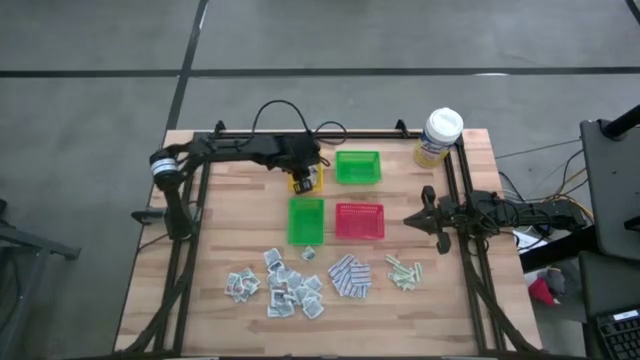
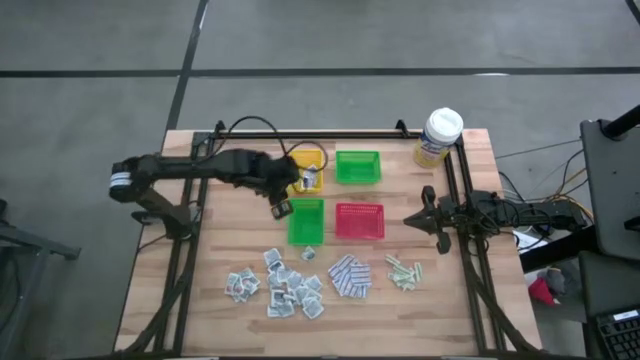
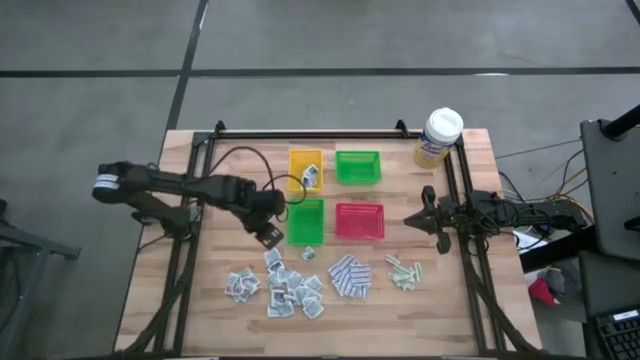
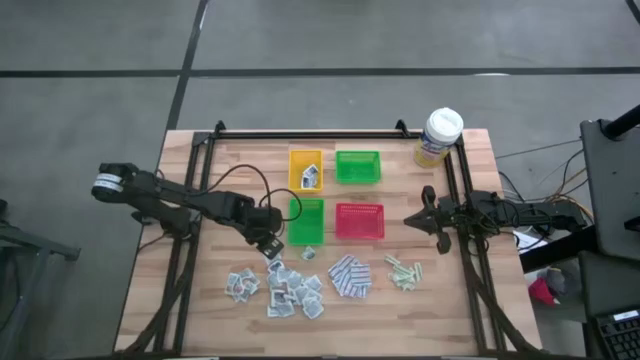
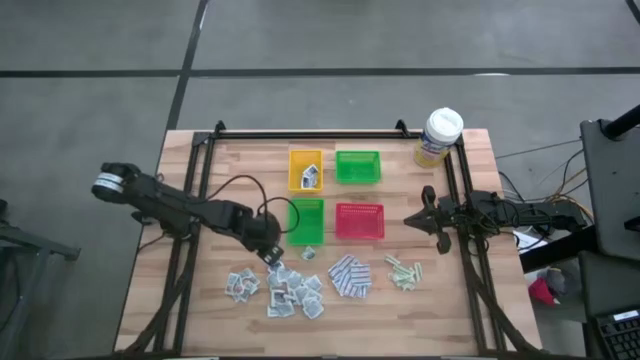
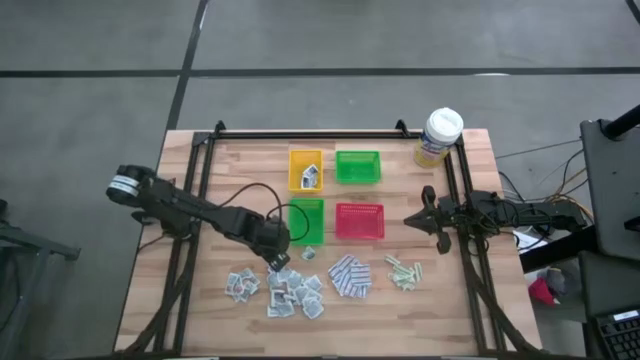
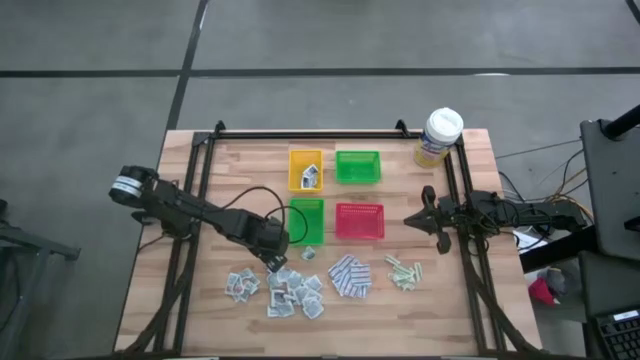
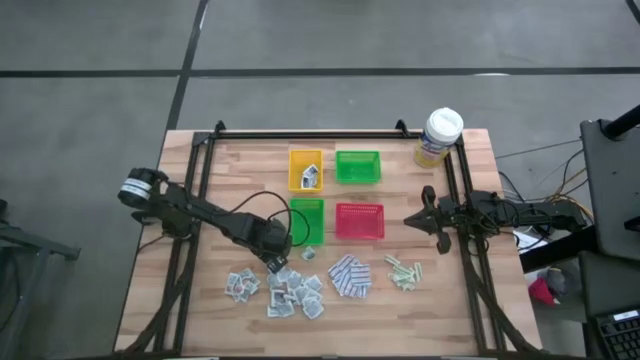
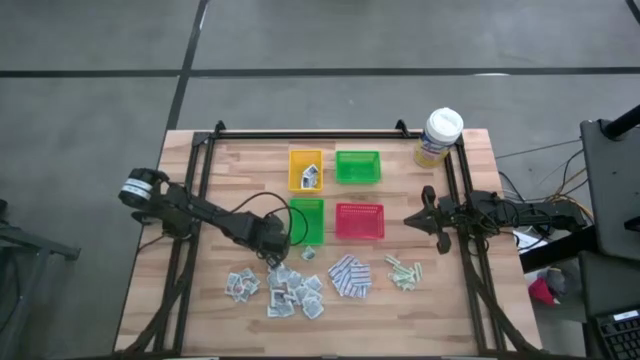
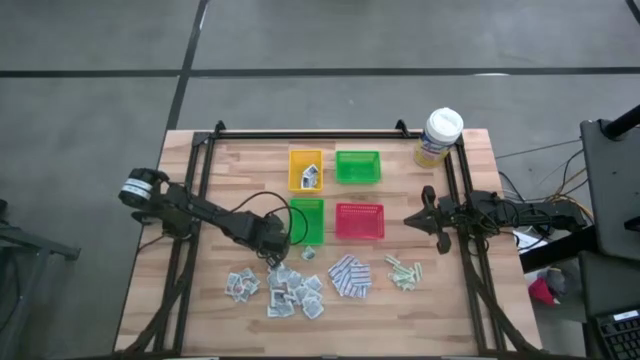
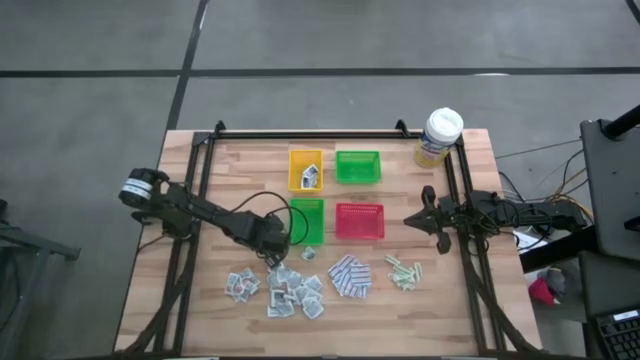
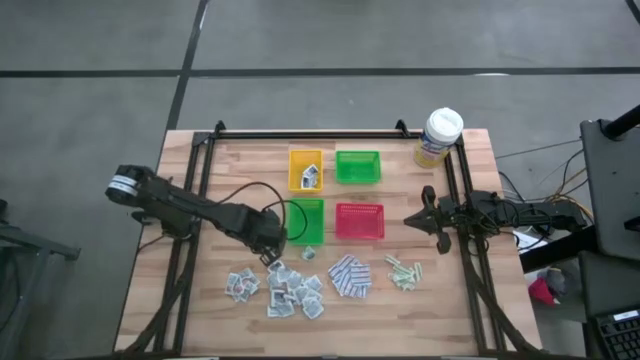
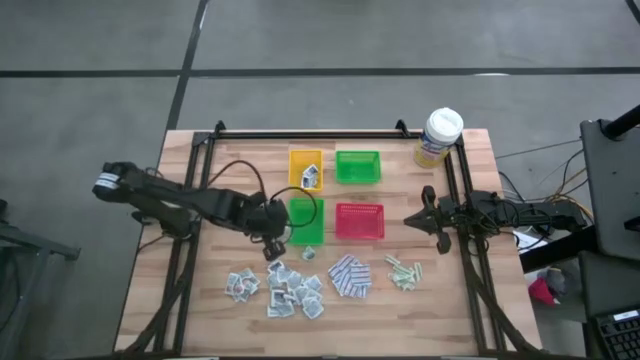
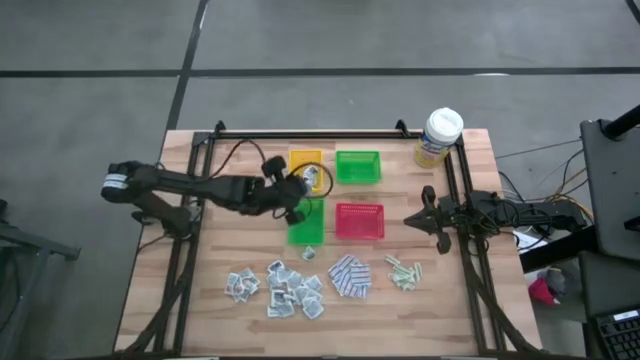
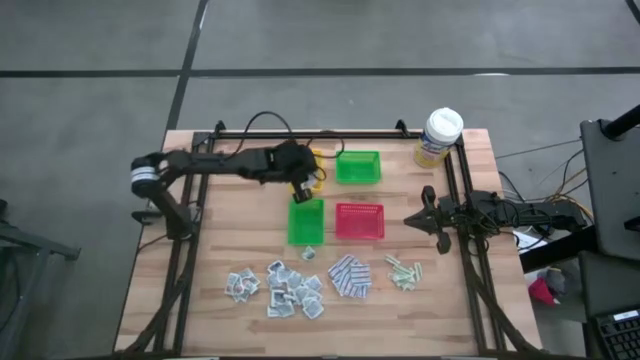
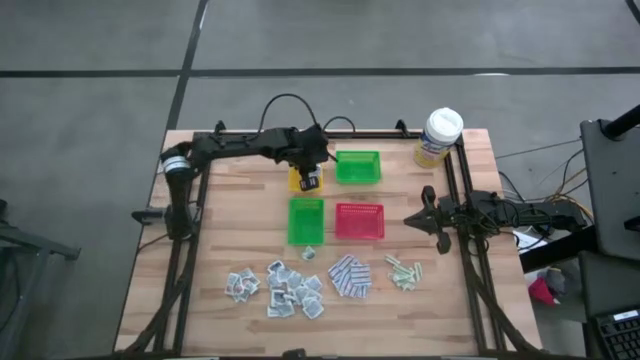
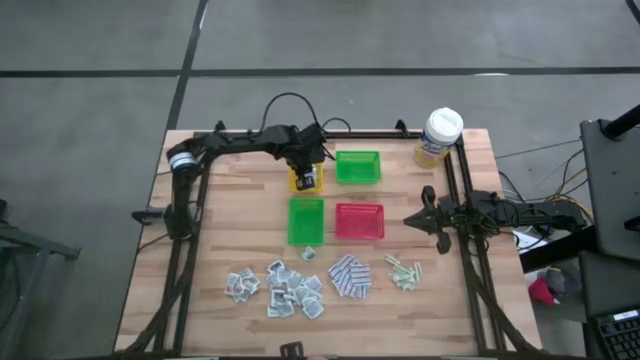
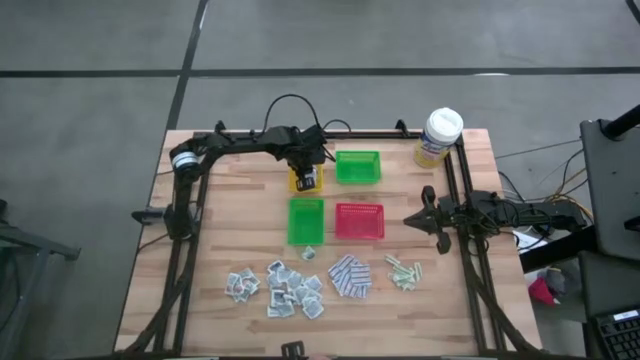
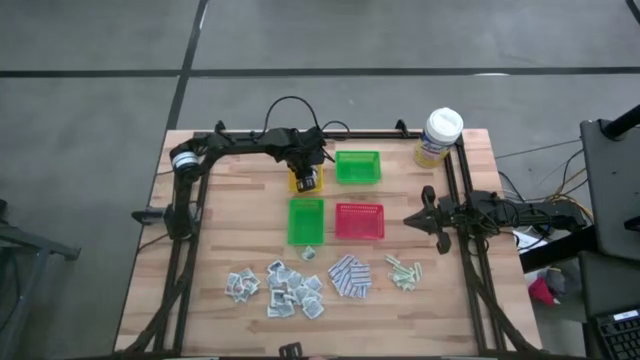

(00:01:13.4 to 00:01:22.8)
Task: Pick & Place First Aid Supplies
Put the blue alcohol pad into the yellow bin

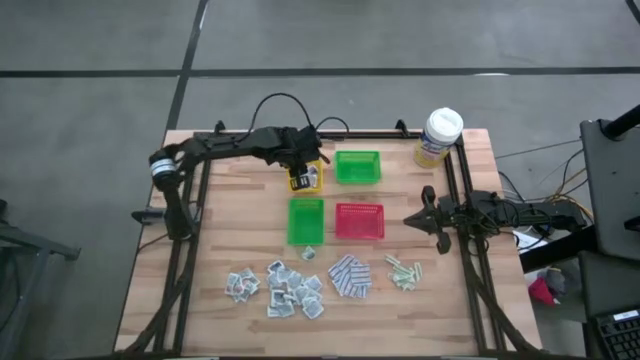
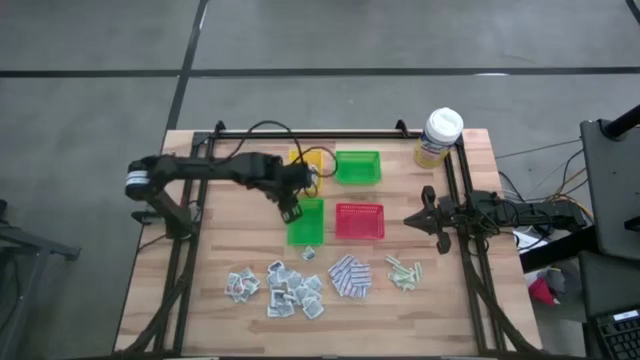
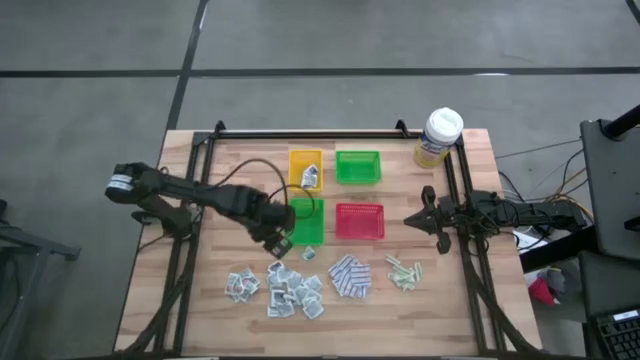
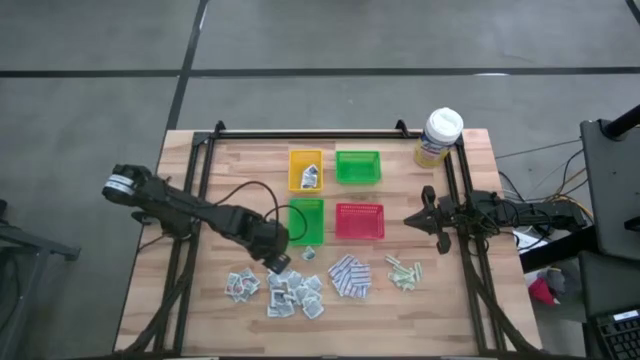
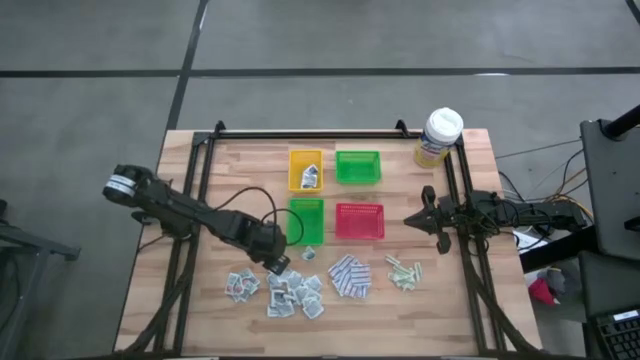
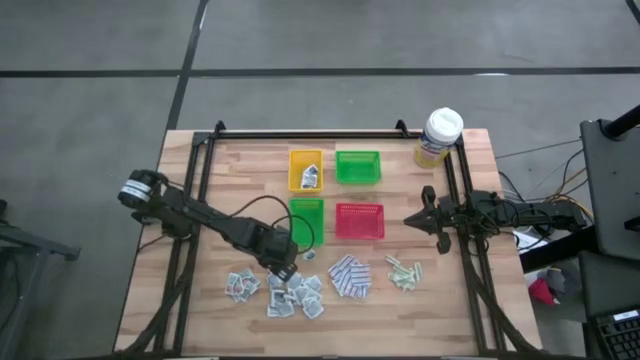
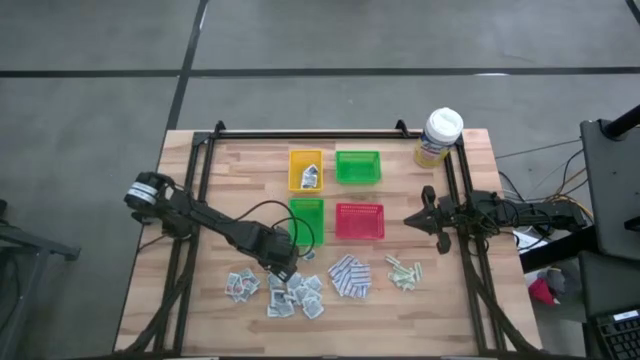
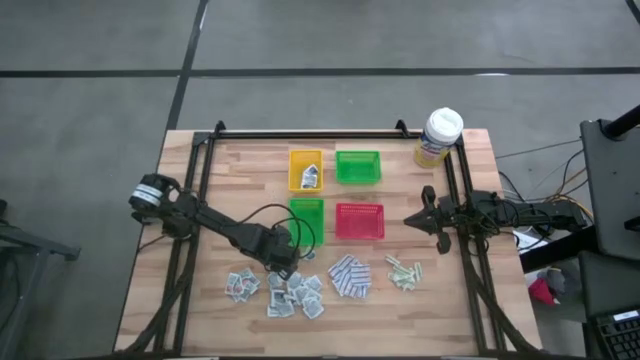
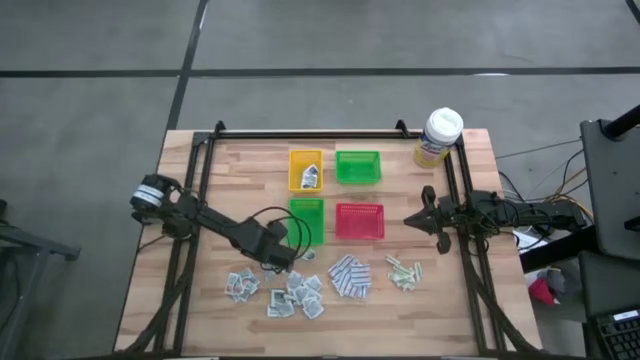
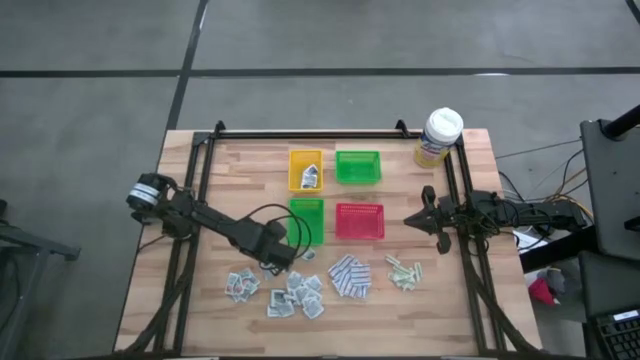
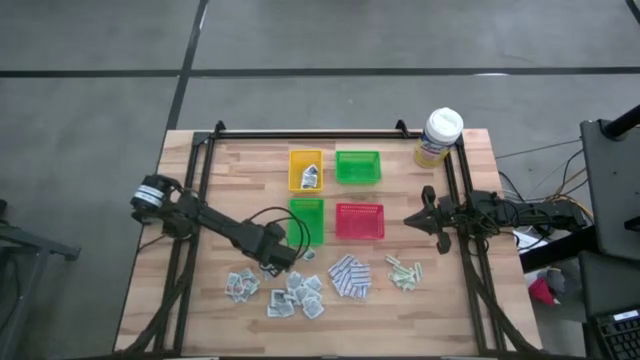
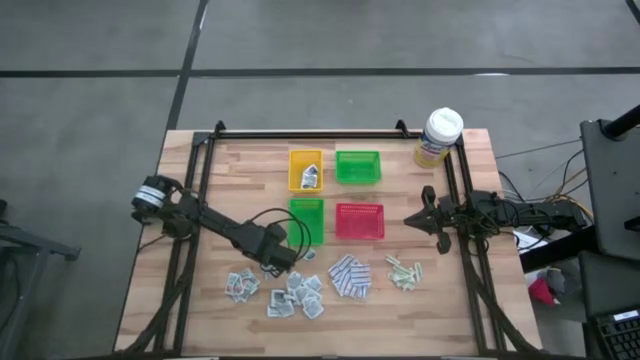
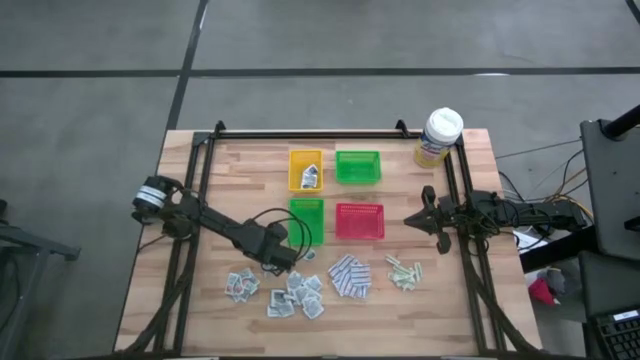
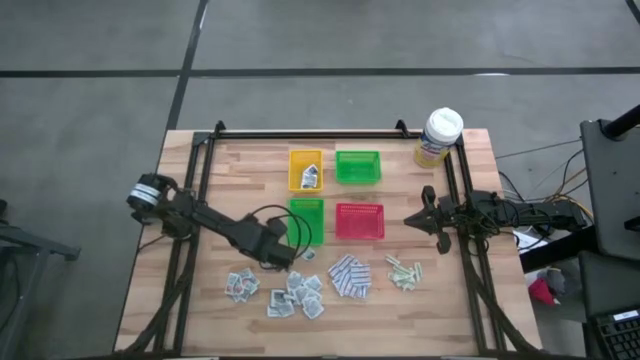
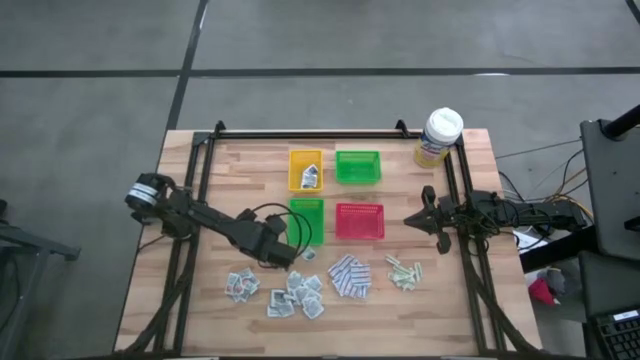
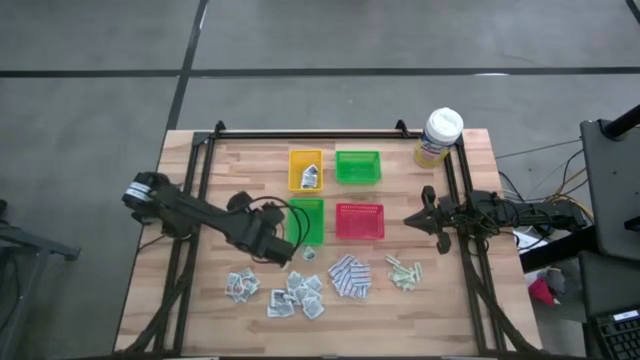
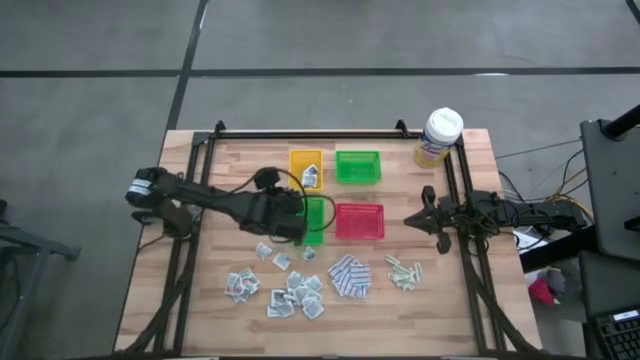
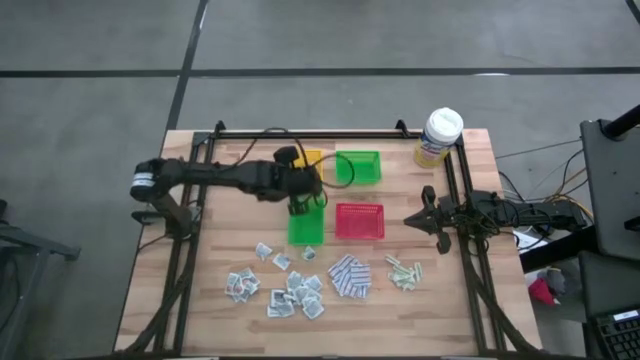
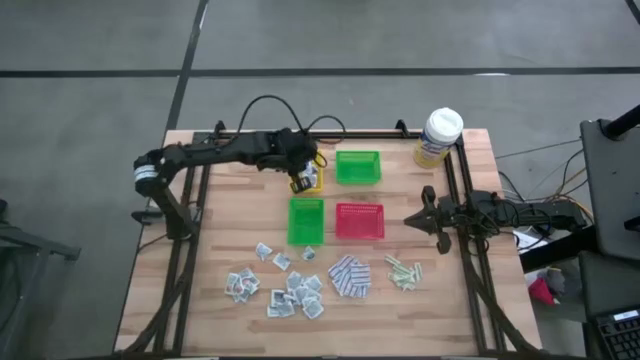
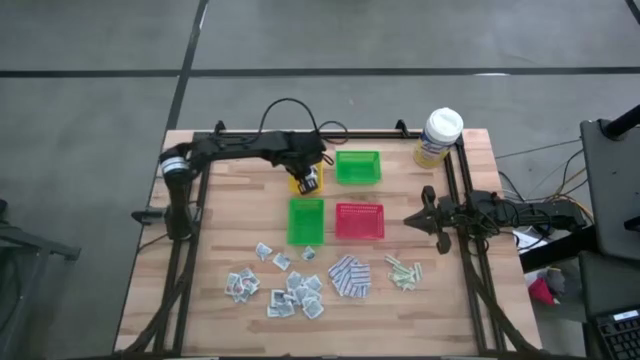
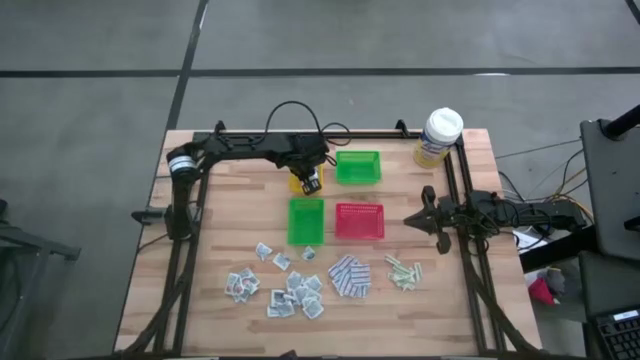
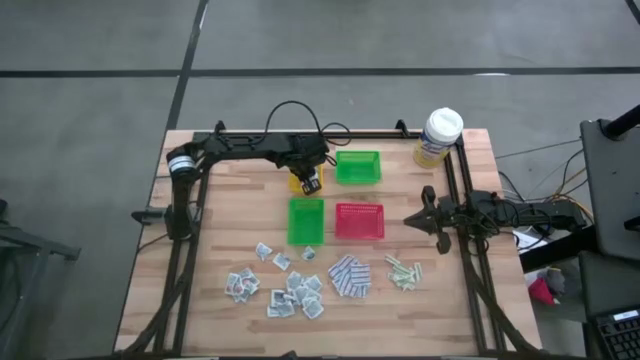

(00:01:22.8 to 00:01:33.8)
Put the blue alcohol pad into the yellow bin

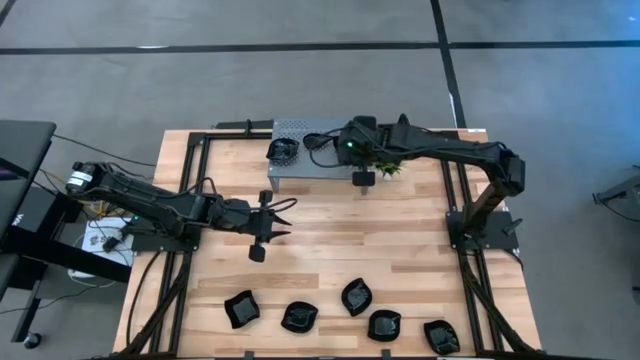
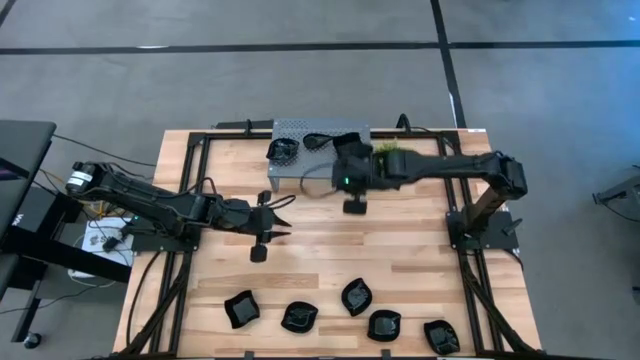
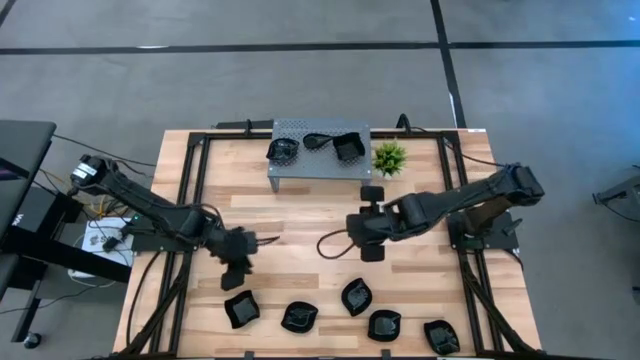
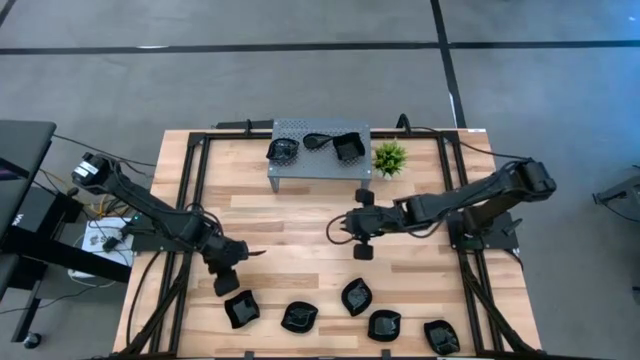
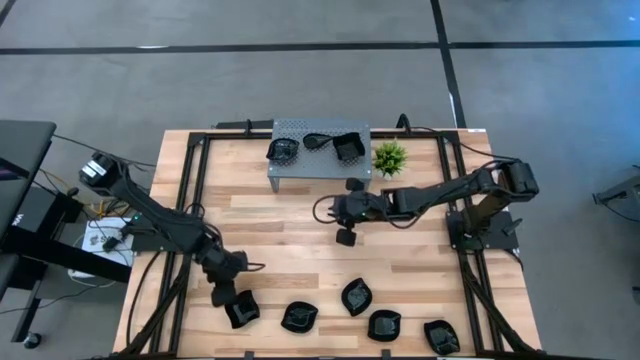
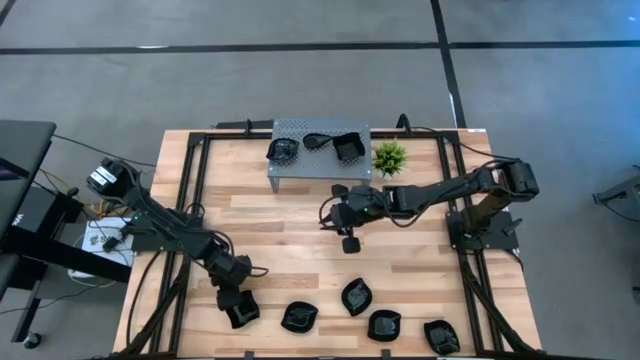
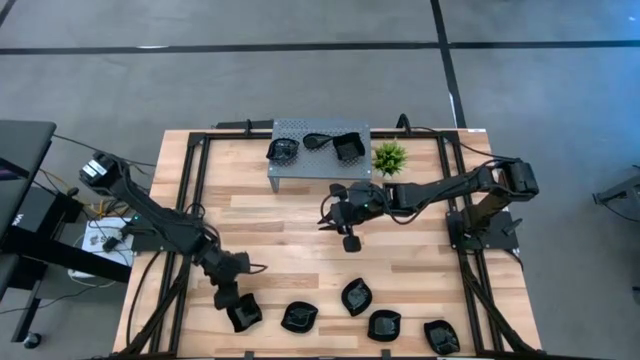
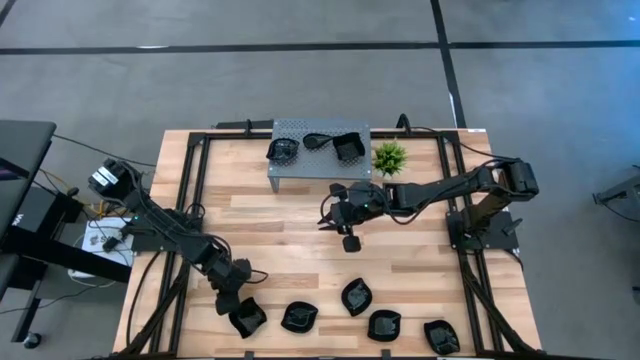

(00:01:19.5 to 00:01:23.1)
Task: Pick & Place Mini shaped plates
Stack the distorted square plate on top of the distorted square plate on the shelf
